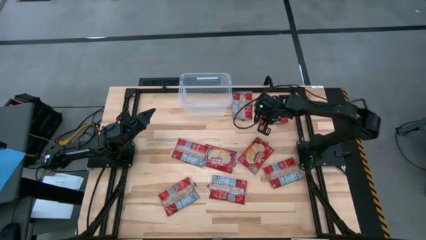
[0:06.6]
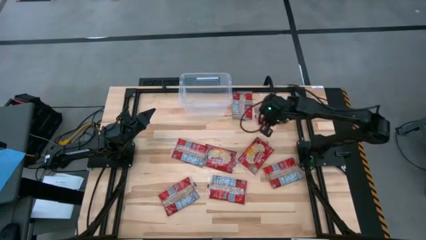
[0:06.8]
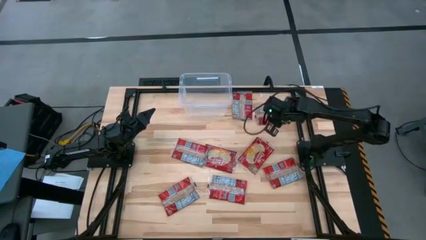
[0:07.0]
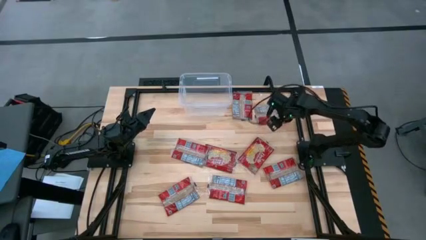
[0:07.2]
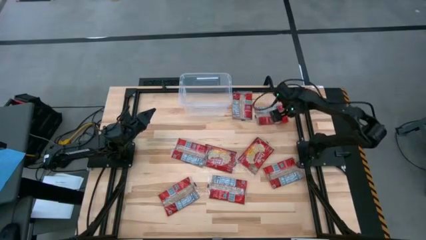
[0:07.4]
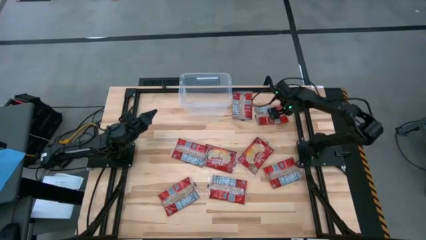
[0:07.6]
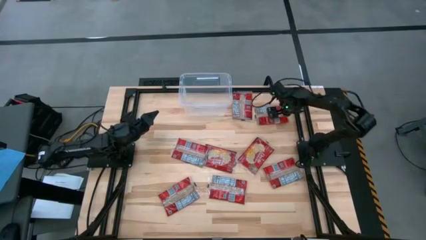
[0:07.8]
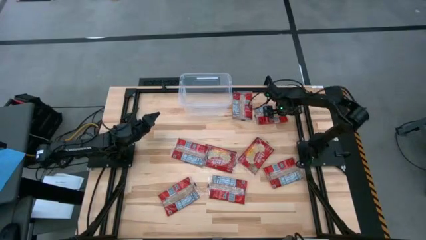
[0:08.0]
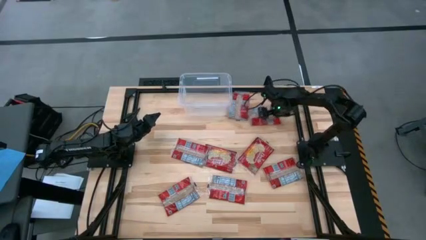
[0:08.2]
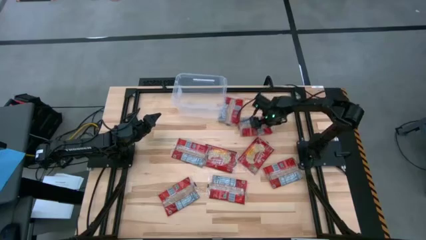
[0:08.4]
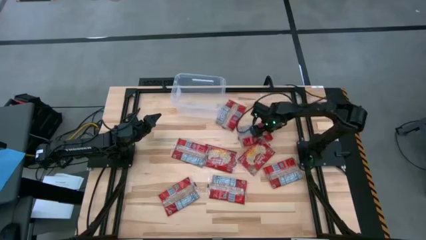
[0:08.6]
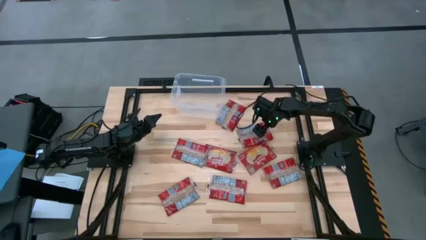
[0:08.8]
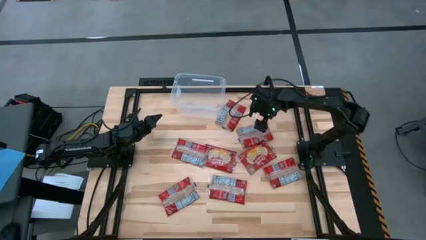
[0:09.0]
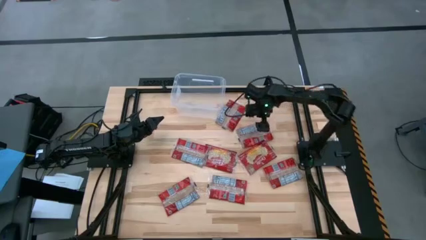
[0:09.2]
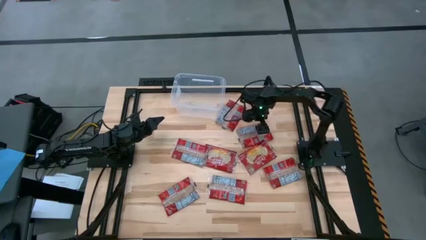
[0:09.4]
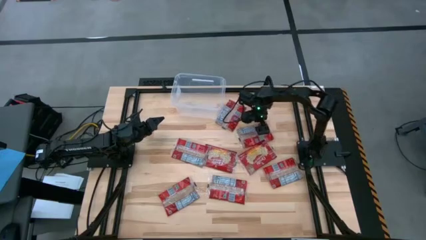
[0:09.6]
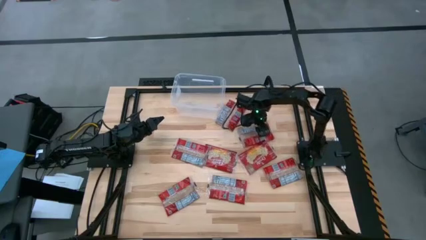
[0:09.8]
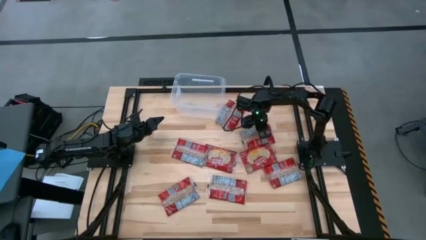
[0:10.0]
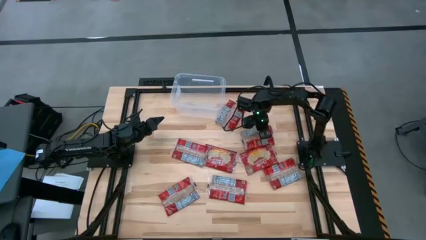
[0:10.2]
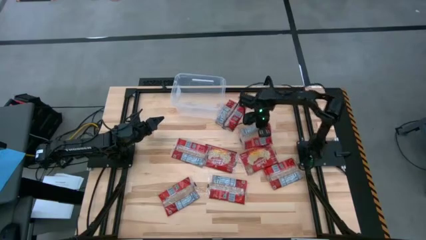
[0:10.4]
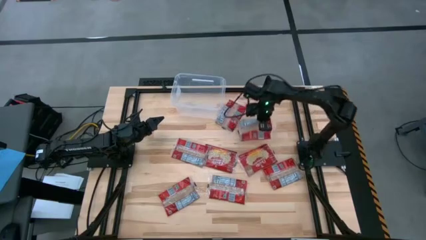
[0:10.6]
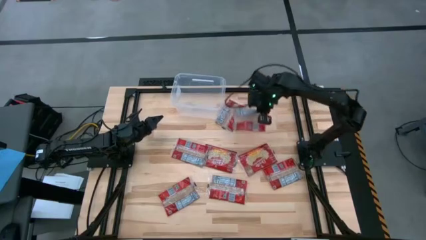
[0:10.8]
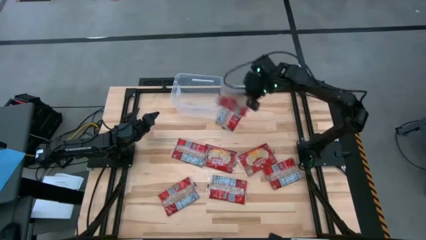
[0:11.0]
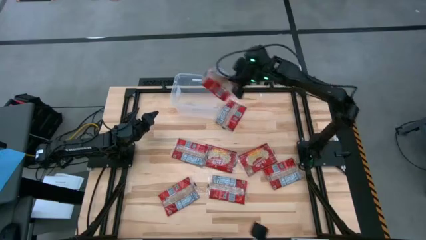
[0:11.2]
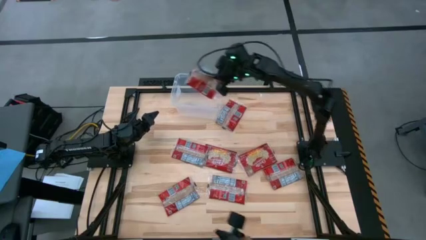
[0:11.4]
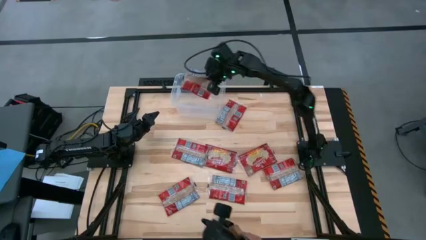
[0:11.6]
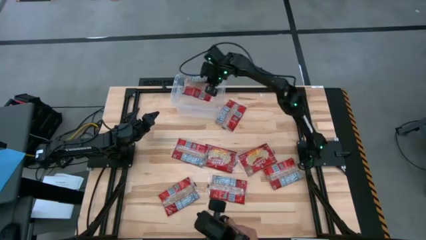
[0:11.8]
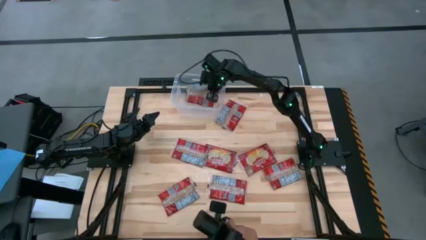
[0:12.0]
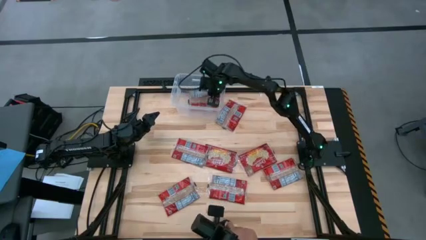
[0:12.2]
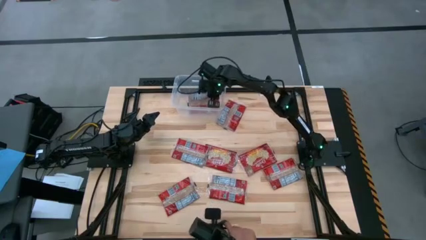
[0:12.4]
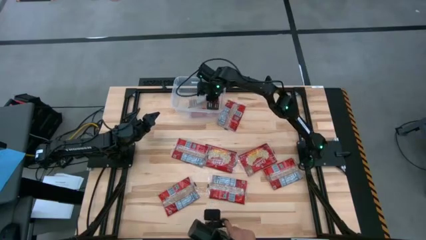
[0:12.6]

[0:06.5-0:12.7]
Task: Sort popcorn bags into baskets
Put the red popcorn bag into the transparent bin

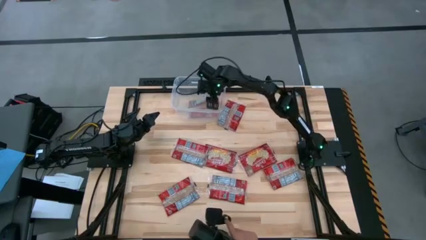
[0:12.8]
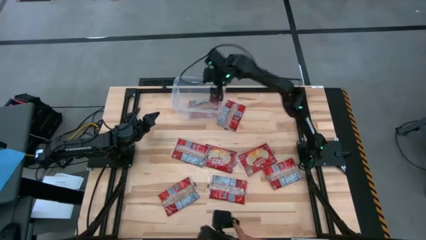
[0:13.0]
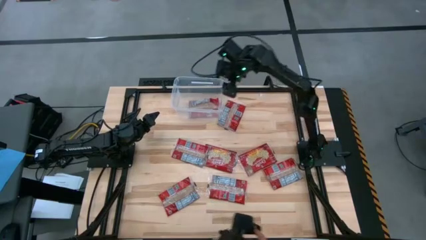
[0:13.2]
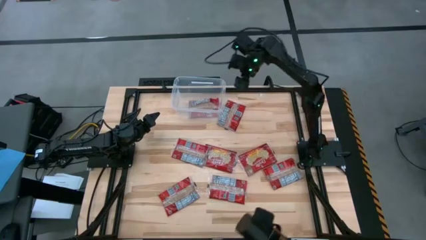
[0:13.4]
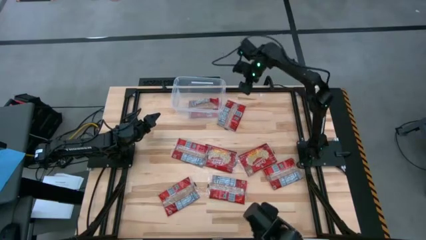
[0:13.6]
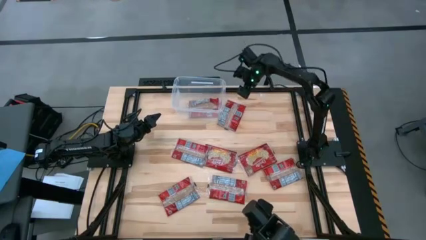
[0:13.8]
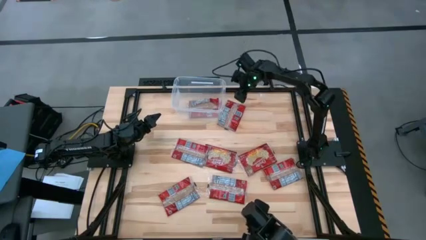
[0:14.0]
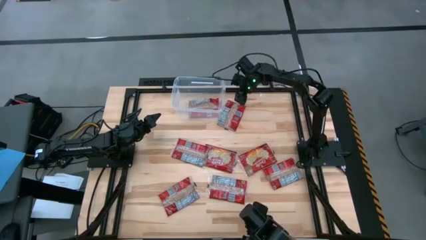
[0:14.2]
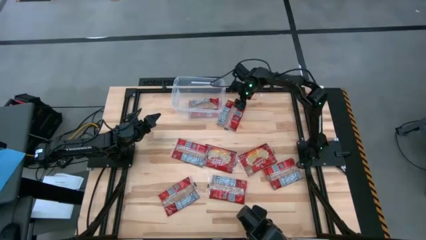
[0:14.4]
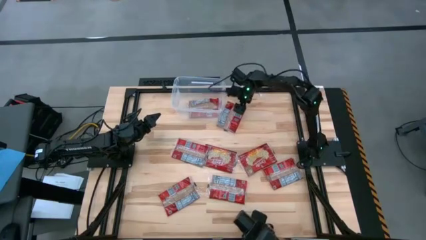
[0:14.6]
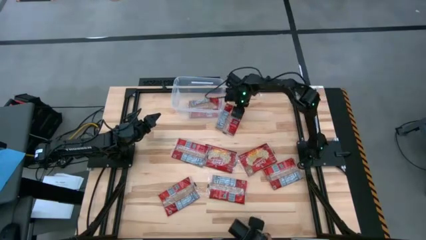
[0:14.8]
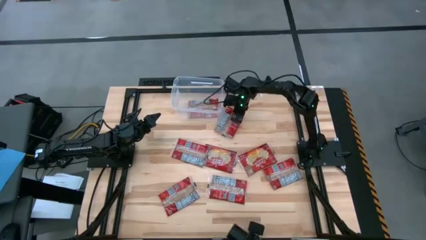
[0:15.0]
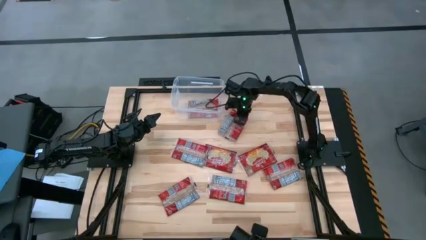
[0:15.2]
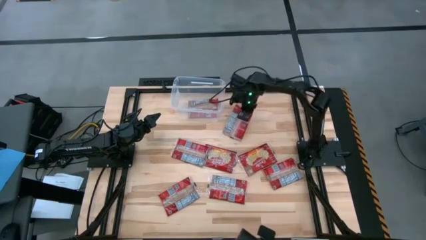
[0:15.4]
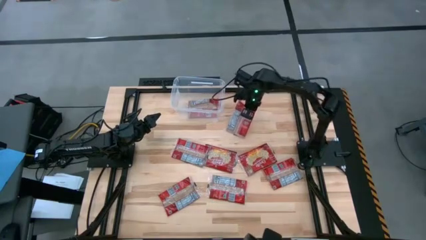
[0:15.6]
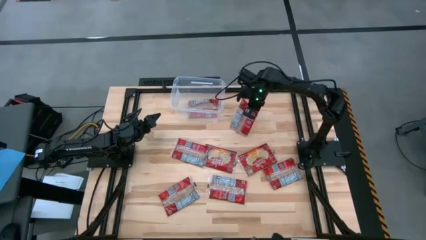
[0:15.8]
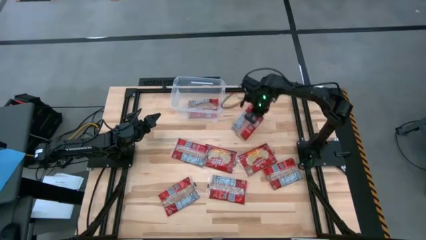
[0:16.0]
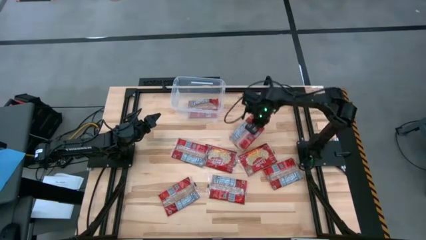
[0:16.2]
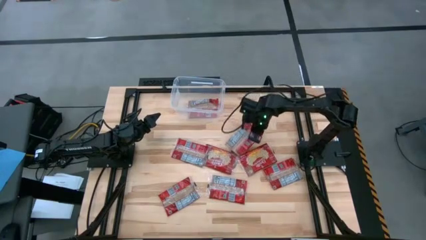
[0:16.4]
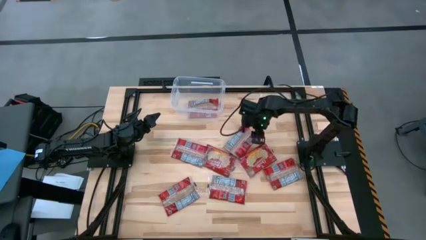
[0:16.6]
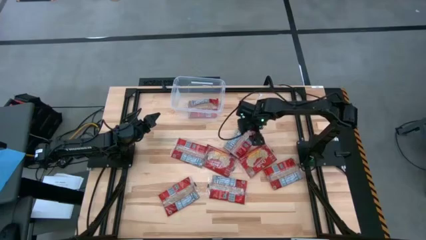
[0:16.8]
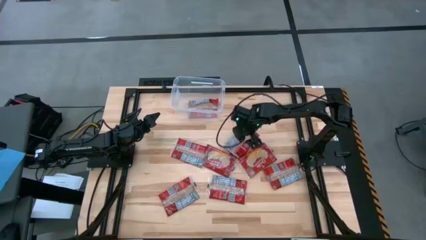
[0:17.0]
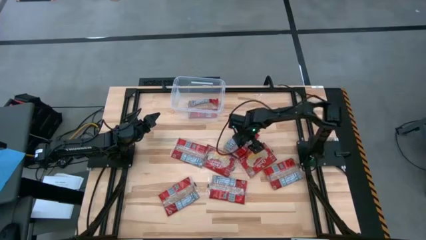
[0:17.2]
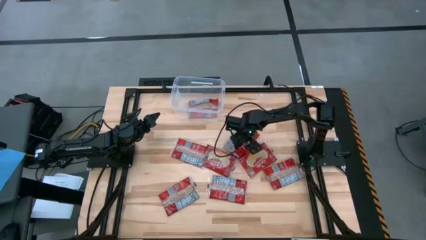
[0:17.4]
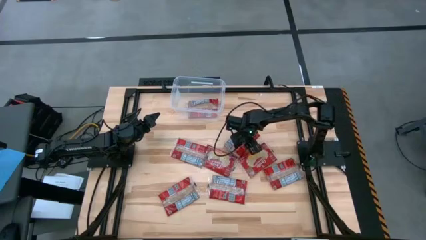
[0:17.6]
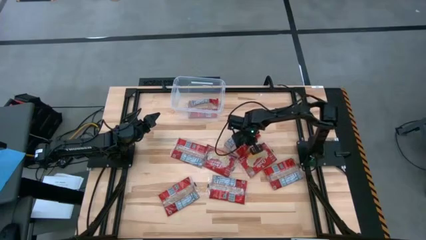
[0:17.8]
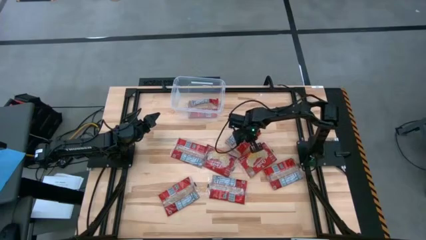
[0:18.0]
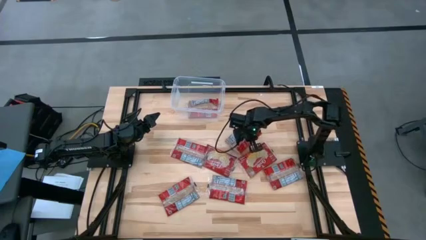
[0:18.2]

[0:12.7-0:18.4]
Put the red popcorn bag into the transparent bin

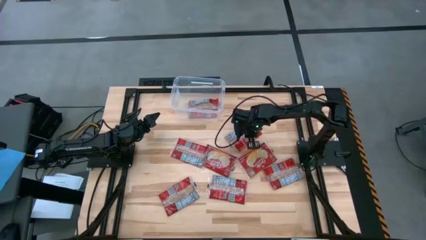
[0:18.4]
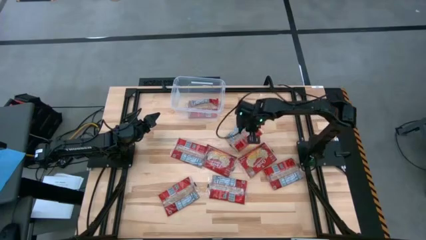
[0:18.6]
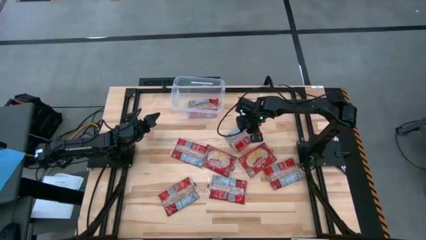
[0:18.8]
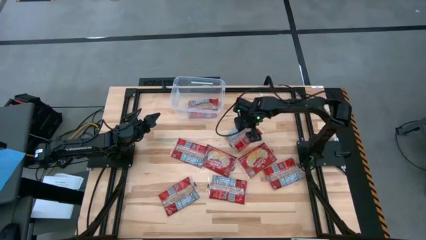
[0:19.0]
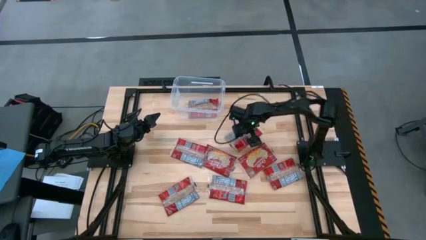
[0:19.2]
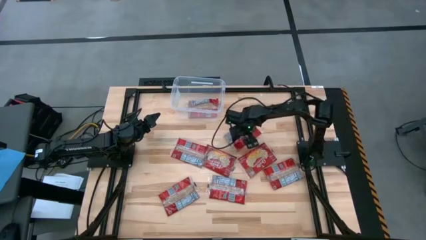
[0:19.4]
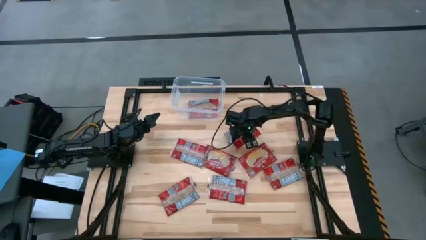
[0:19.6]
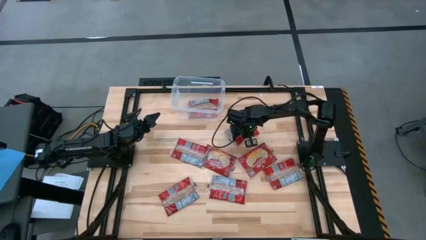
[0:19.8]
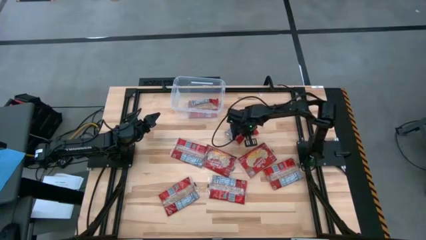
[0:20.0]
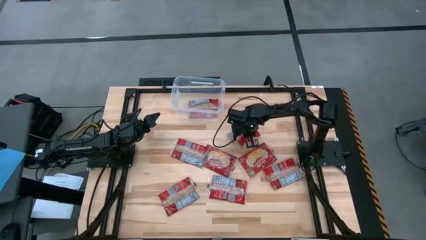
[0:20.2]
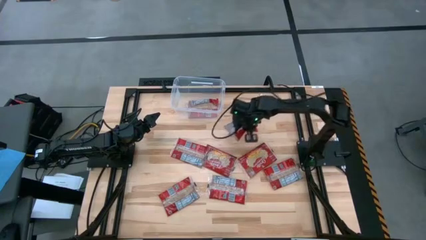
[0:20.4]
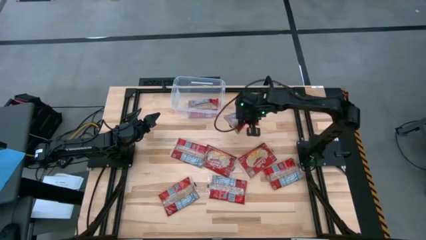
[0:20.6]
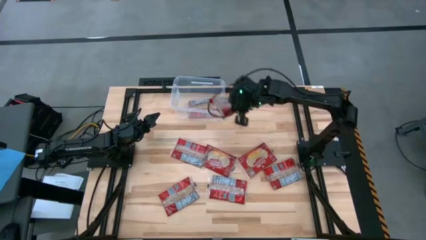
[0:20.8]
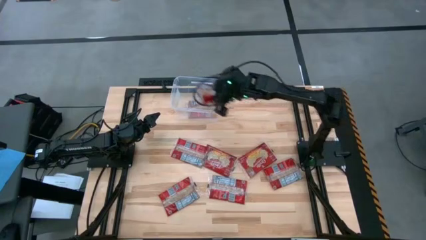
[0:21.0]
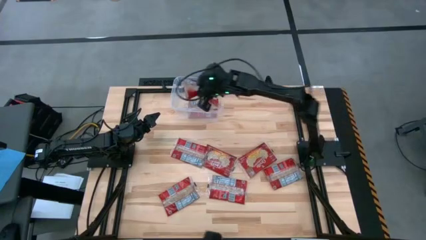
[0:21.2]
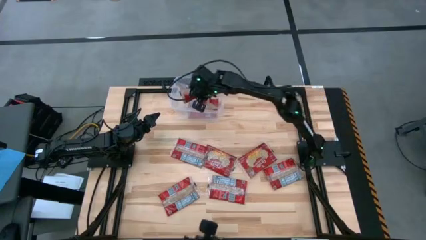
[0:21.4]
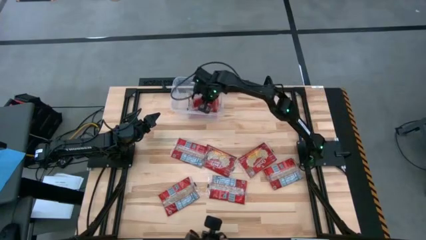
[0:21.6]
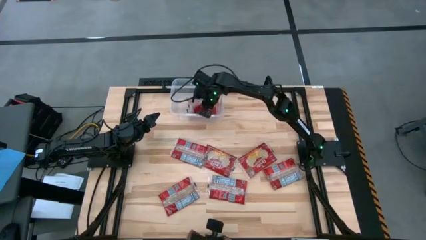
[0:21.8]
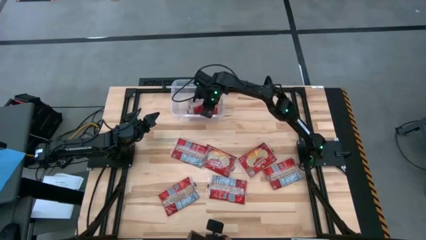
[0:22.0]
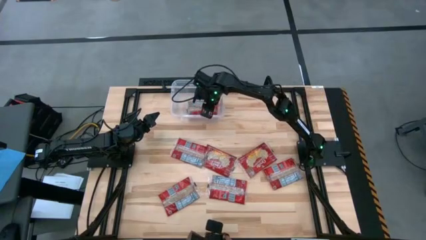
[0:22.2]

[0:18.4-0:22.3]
Put the red popcorn bag into the transparent bin
